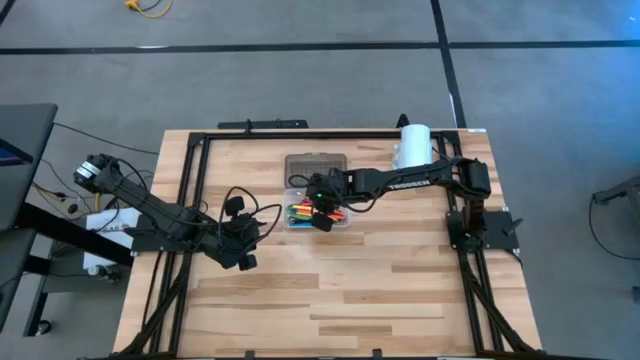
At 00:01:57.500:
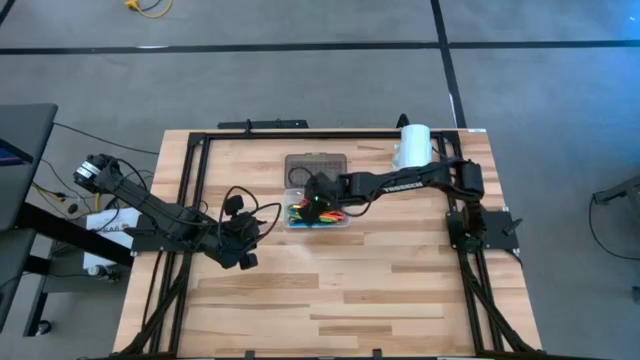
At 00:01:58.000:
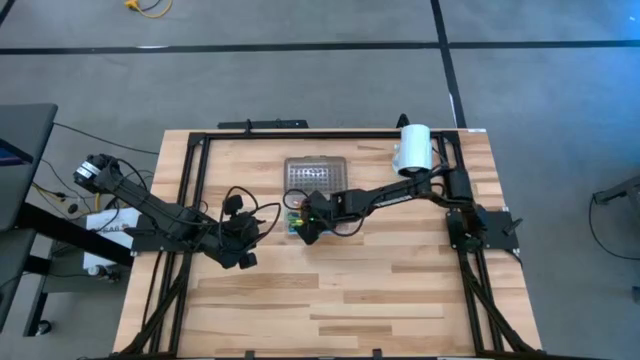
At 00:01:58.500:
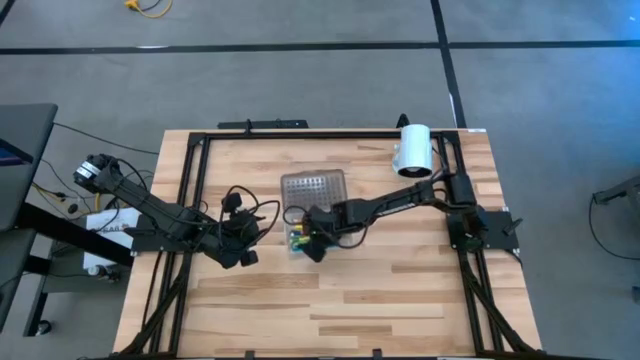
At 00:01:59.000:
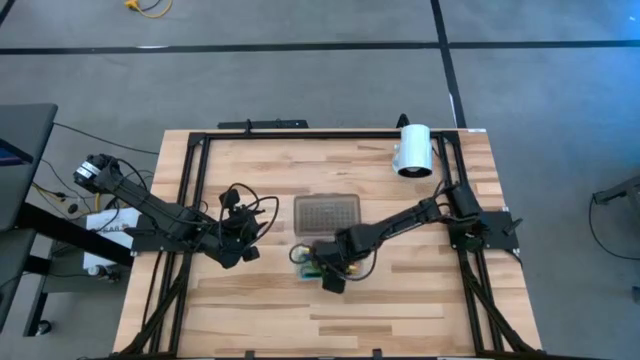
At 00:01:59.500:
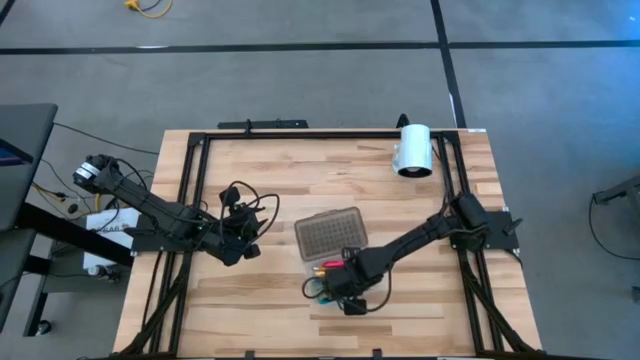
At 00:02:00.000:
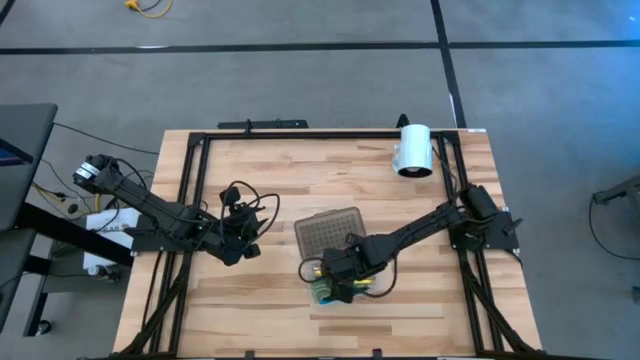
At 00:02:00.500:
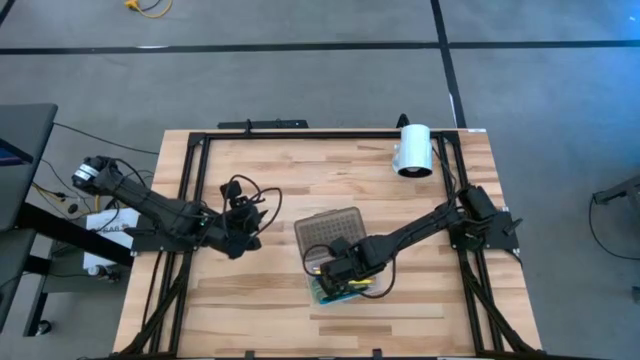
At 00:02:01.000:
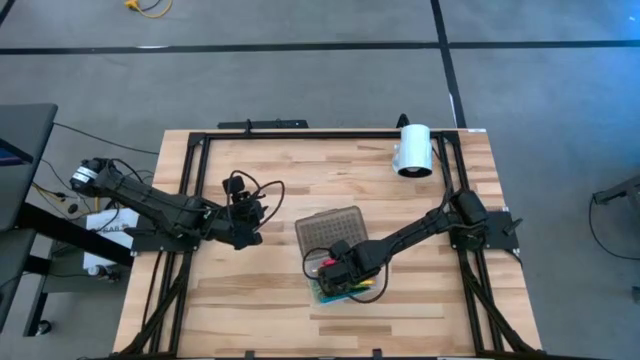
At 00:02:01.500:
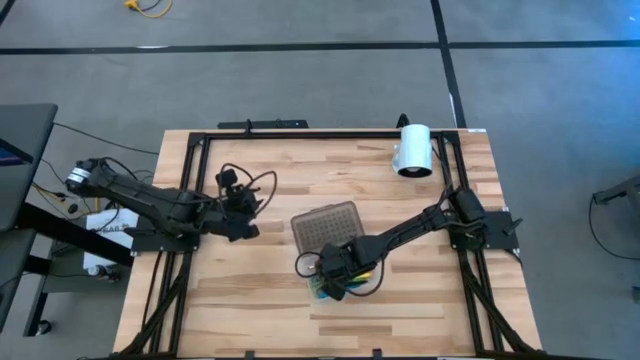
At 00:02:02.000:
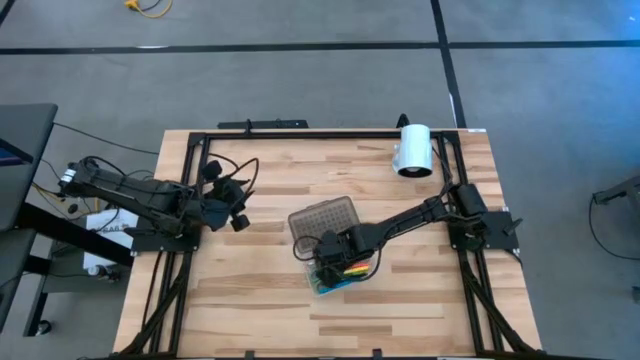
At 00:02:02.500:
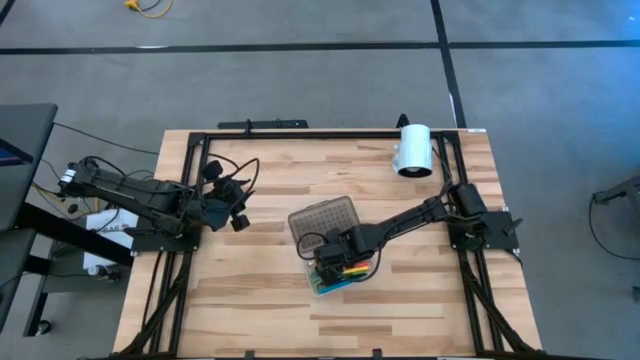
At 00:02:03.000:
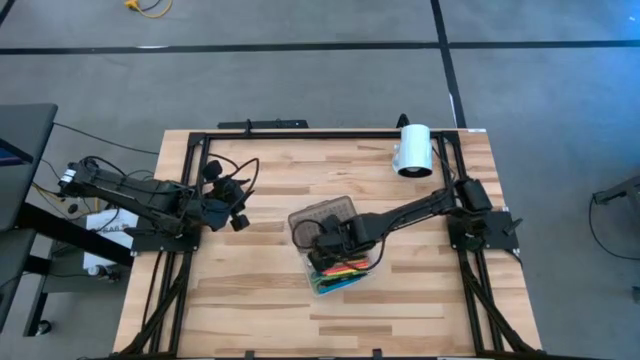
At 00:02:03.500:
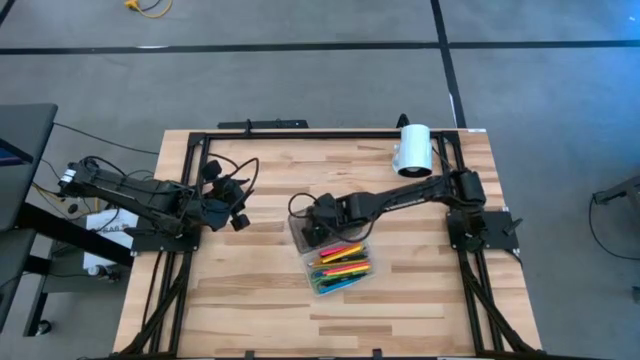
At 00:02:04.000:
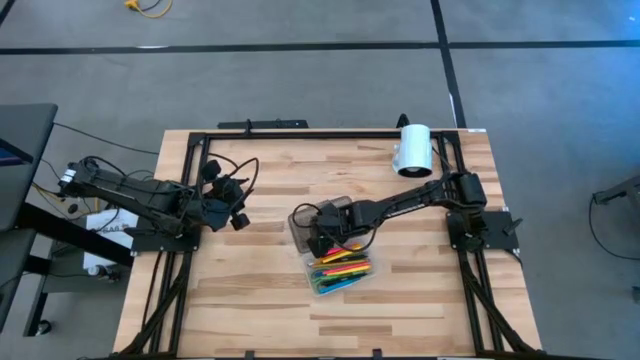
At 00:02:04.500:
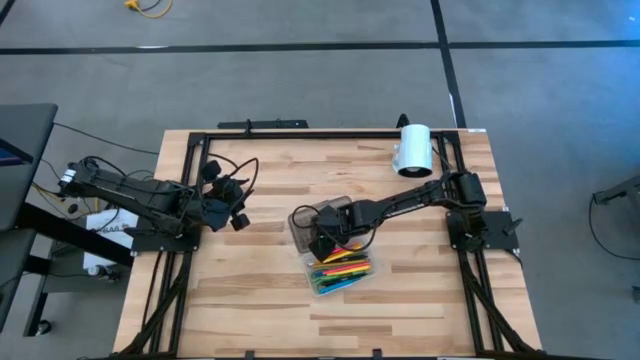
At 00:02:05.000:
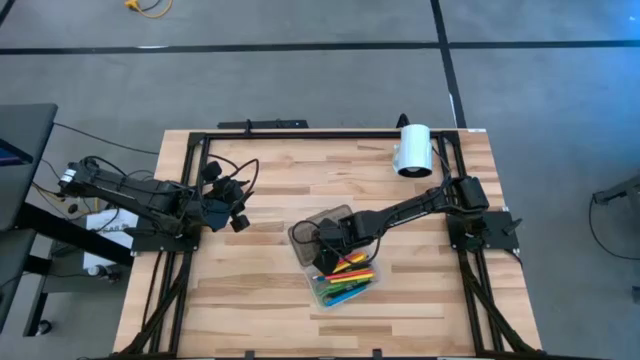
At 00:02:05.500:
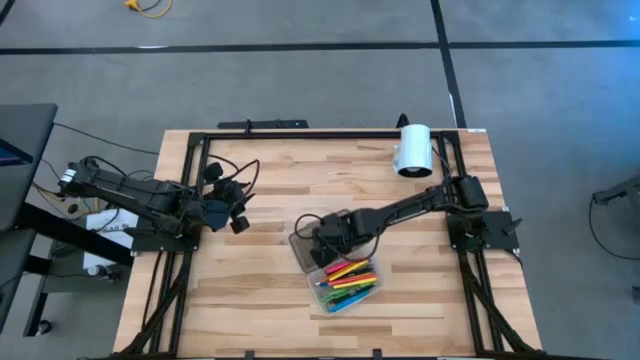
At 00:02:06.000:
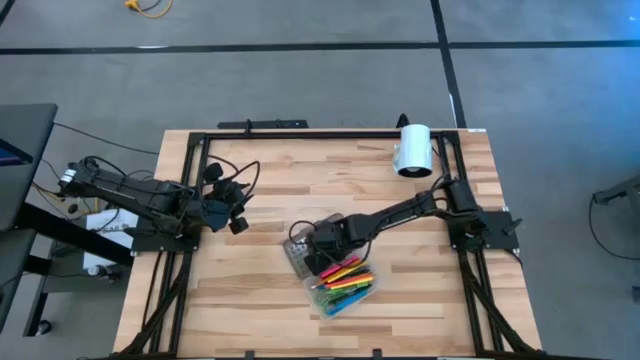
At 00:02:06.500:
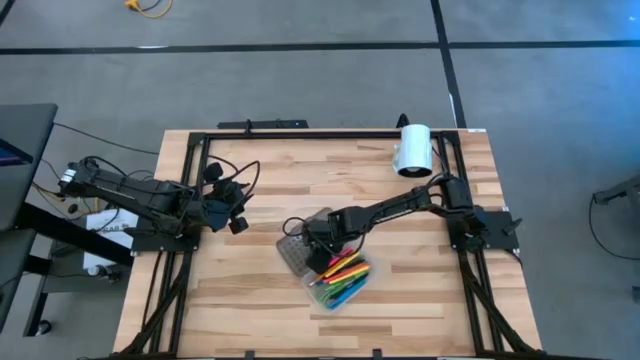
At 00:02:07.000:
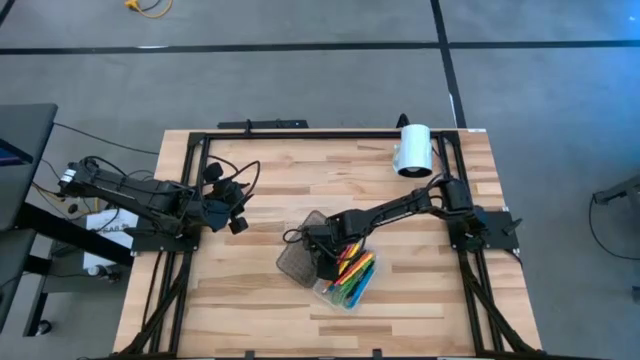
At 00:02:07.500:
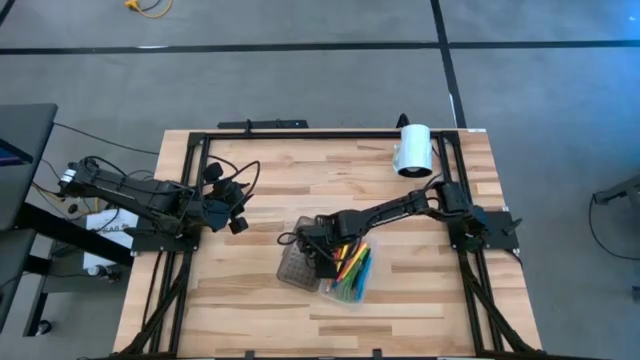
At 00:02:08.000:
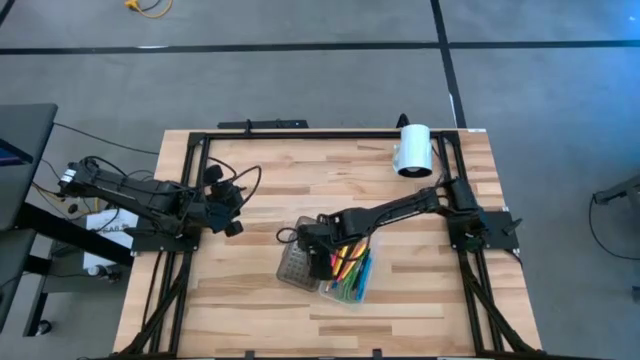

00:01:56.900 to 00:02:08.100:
Task: Pick & place school supplies into a supply box
Adjust the supply box

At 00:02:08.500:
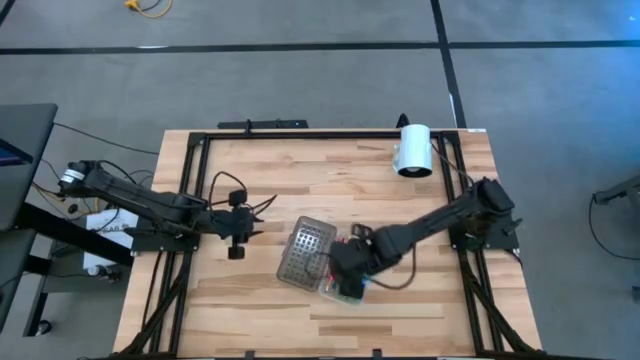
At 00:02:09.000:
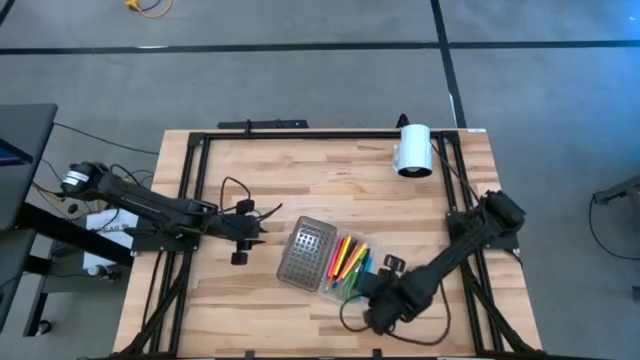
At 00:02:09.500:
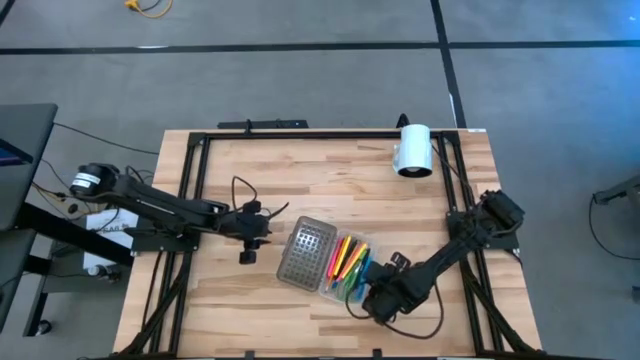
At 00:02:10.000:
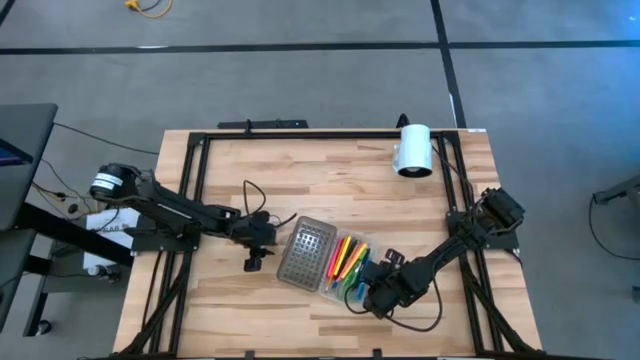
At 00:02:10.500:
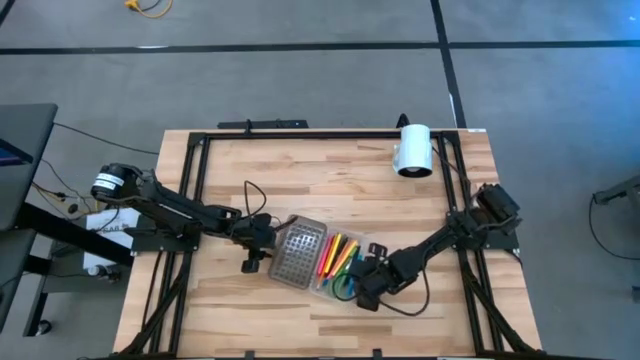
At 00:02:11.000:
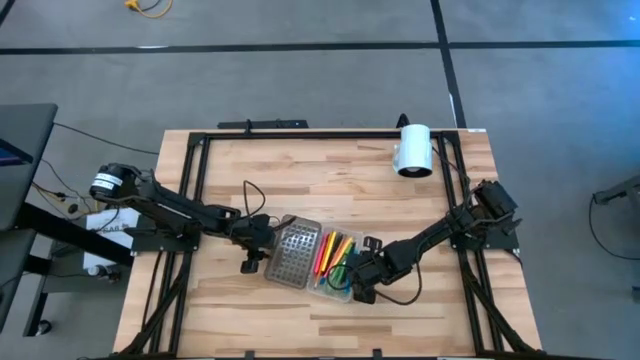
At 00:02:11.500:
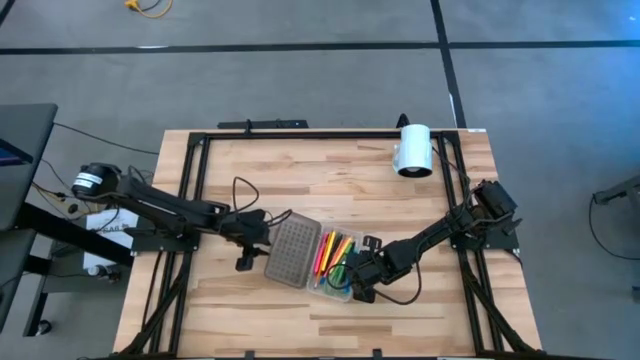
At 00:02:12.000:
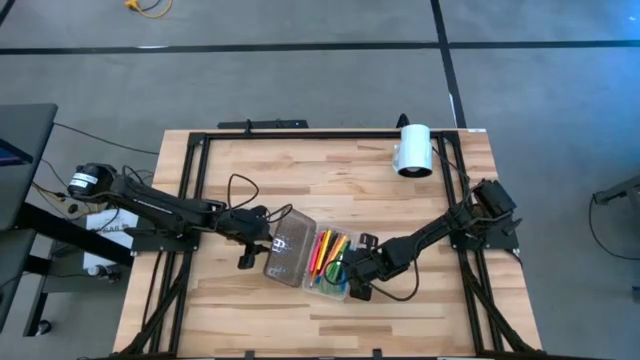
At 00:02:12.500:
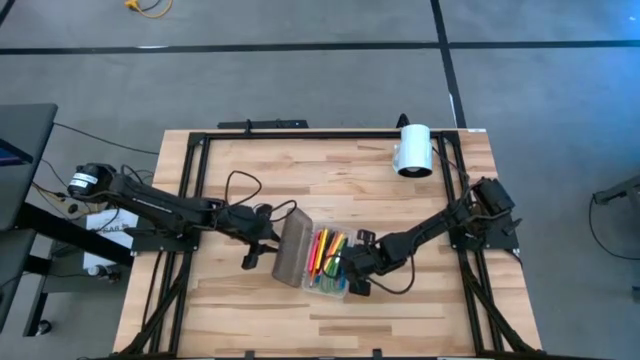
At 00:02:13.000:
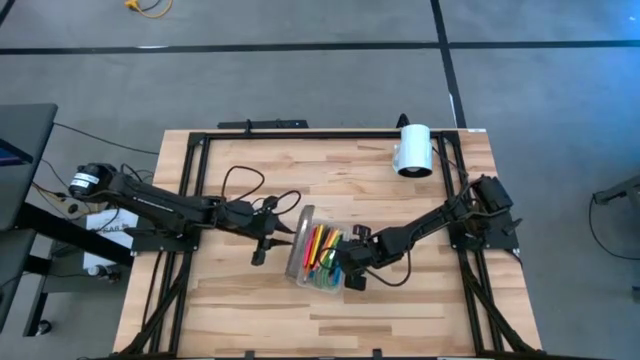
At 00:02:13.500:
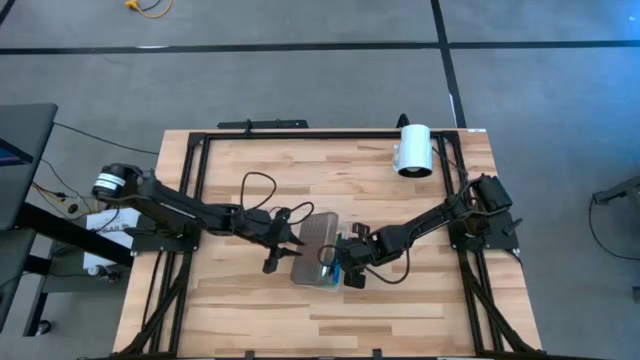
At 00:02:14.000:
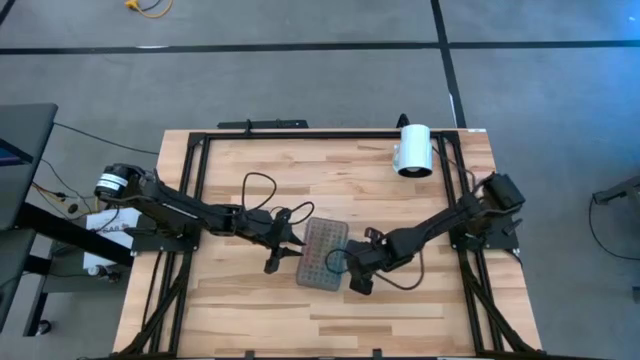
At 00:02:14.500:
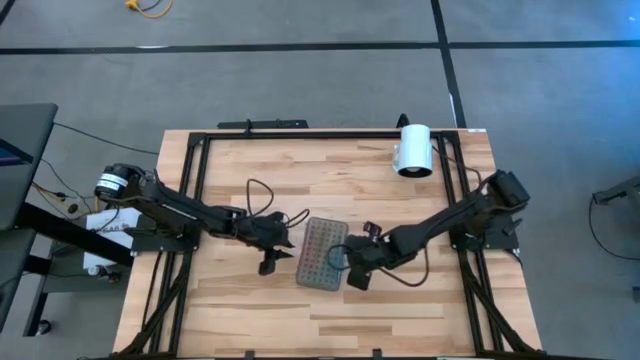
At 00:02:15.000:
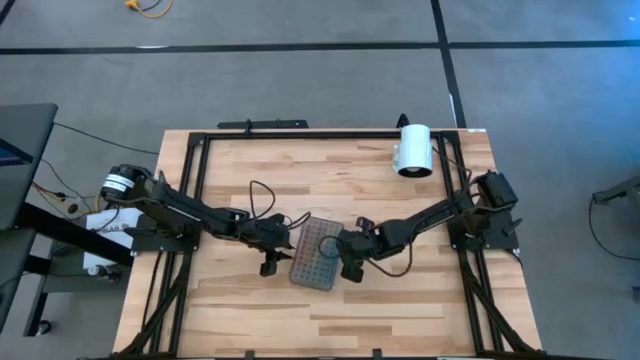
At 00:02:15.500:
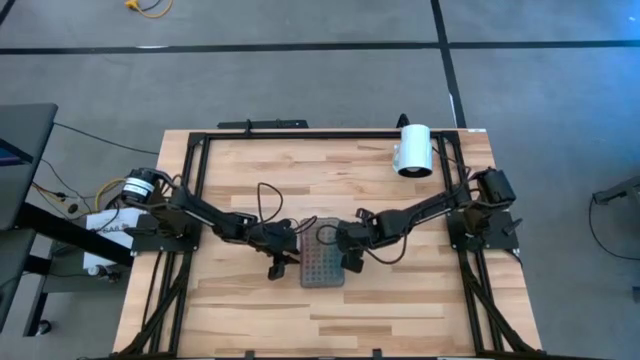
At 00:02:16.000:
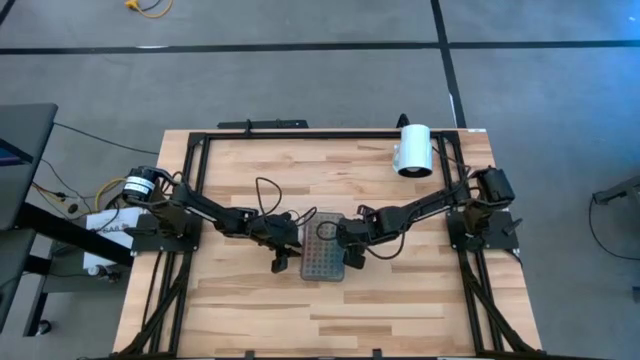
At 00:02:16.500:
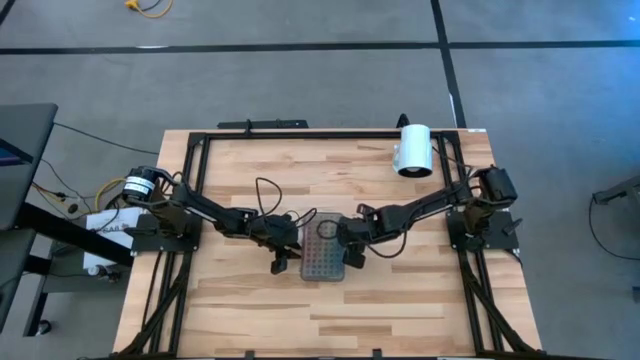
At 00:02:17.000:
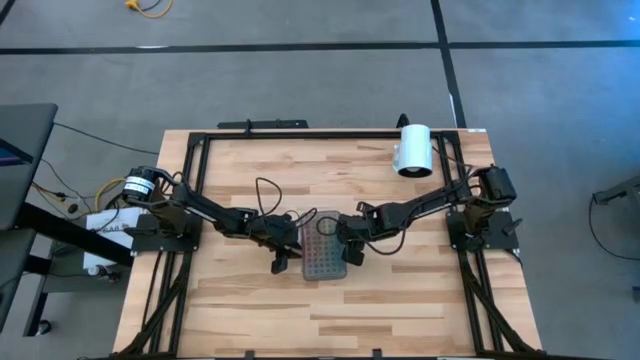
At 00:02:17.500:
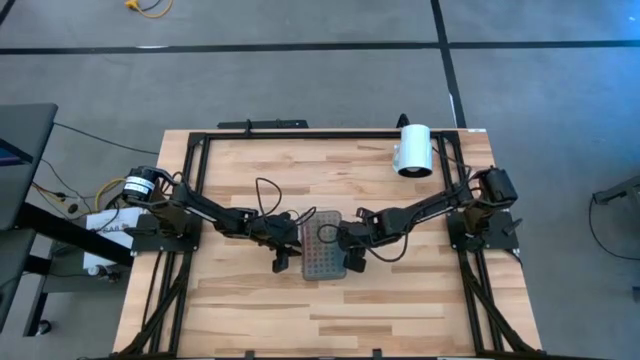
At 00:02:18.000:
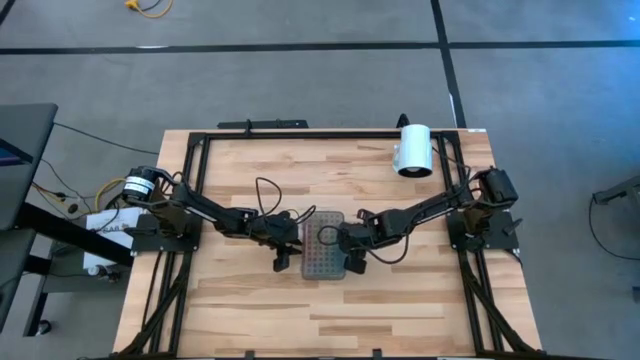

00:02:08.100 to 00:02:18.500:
Close the supply box
